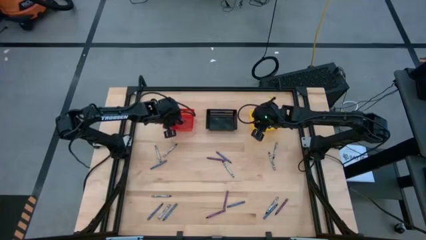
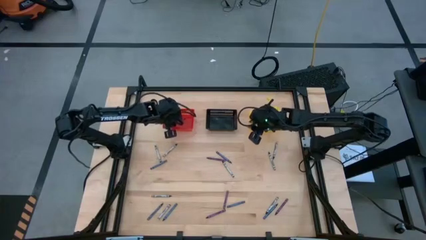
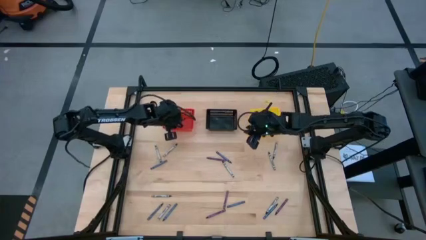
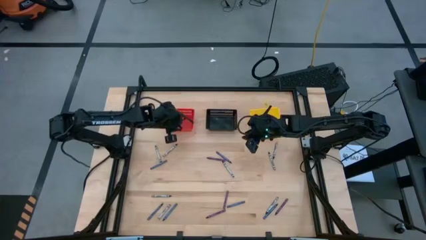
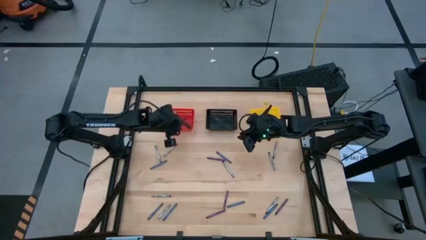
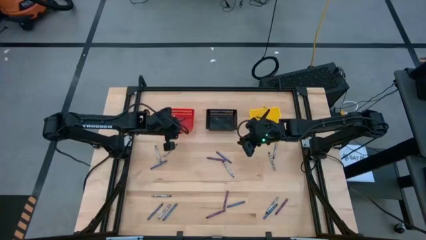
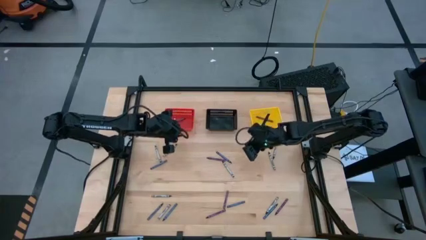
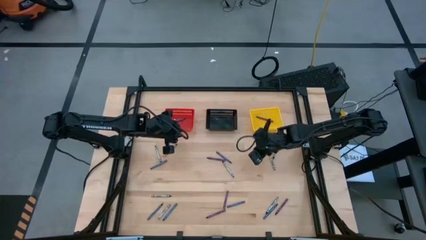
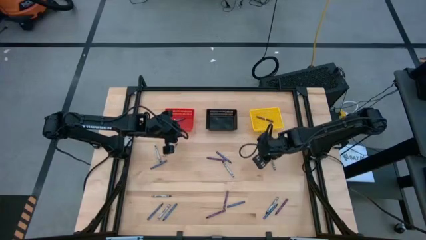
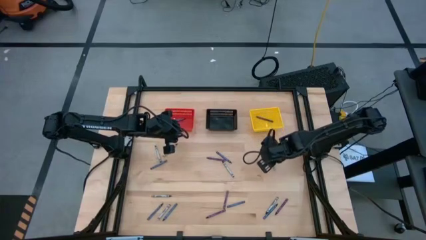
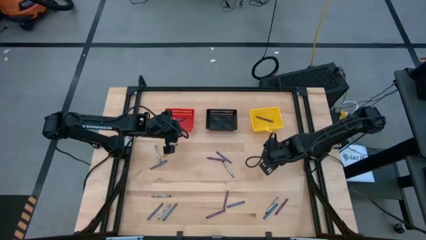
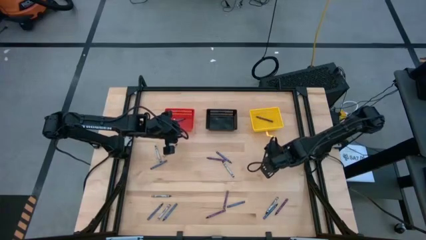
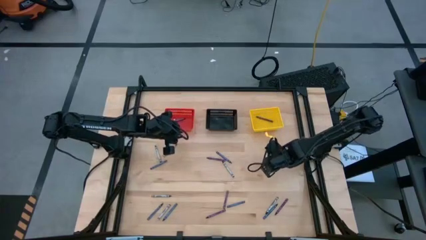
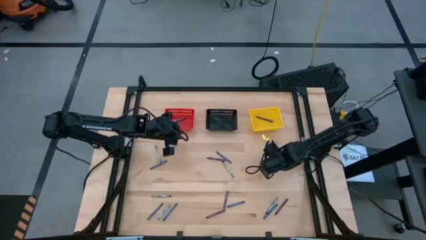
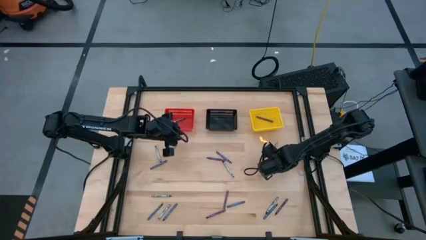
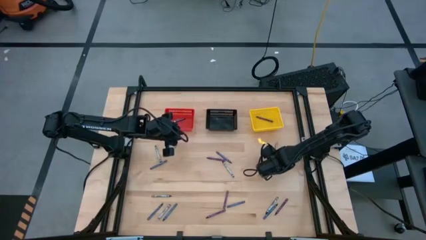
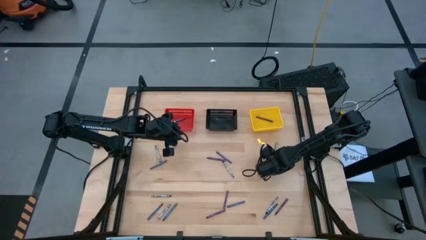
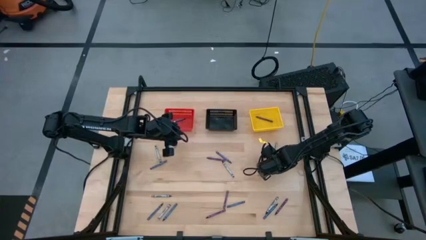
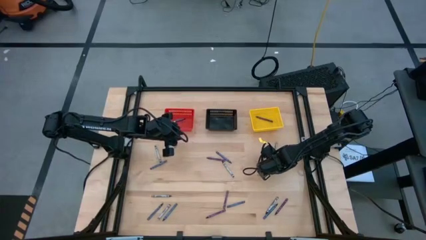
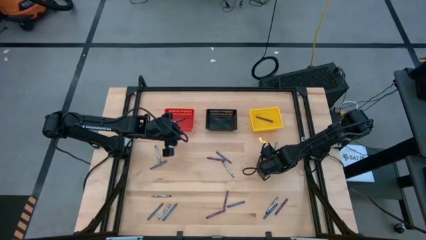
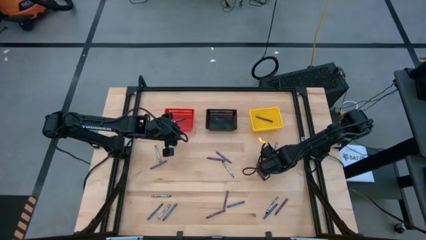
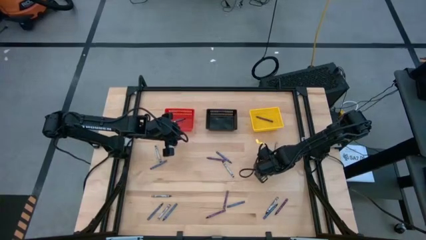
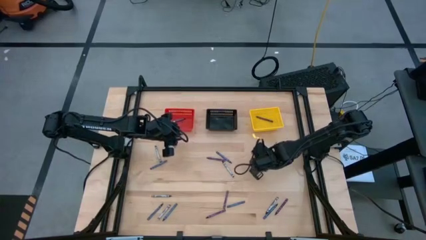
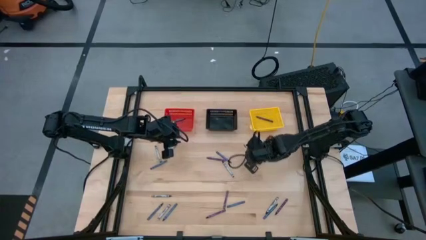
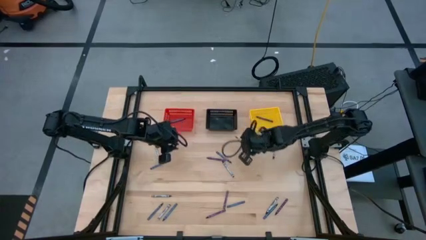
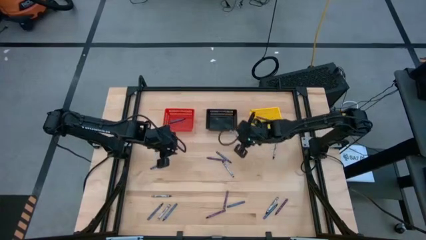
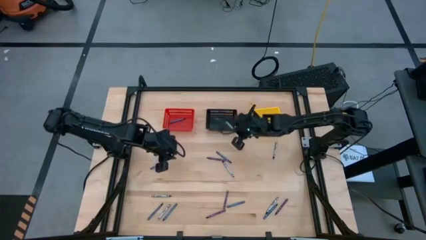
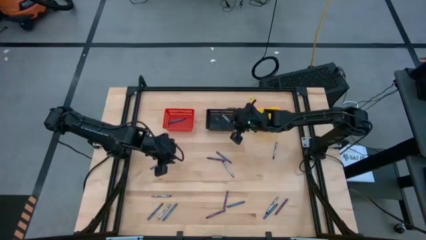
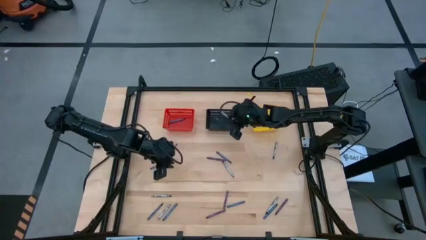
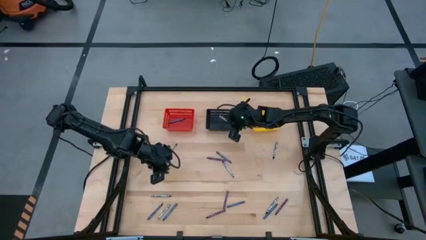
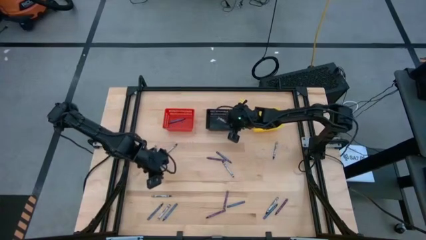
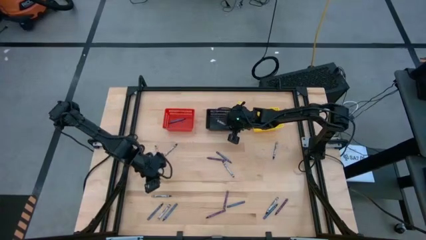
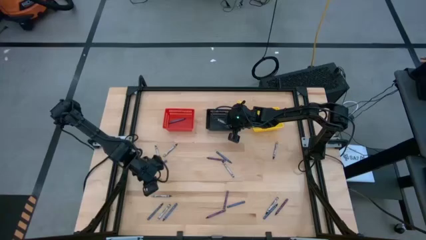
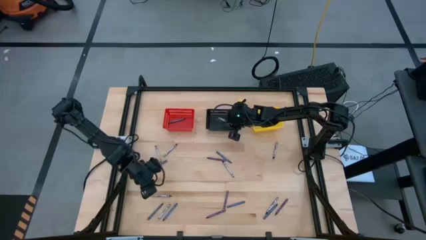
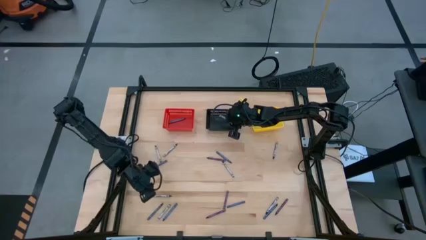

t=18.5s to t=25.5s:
Task: Sort crayons
Put the black crayon into the black basket

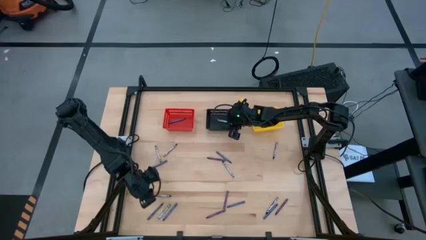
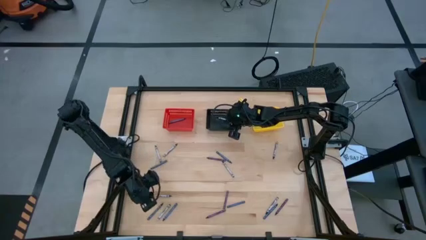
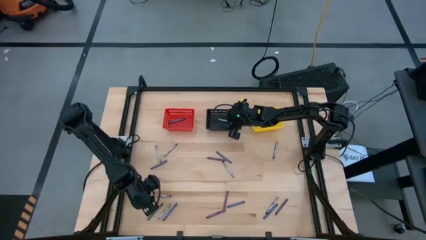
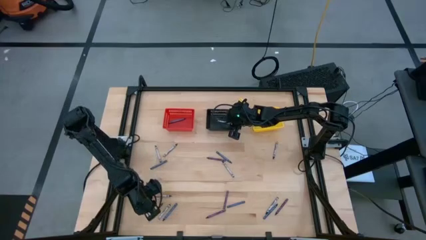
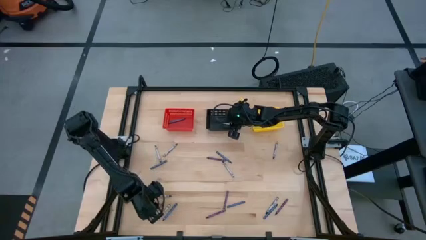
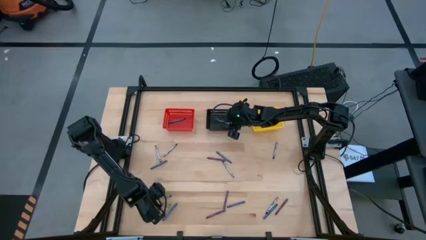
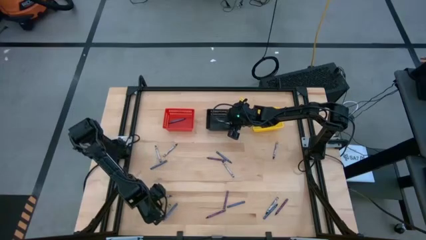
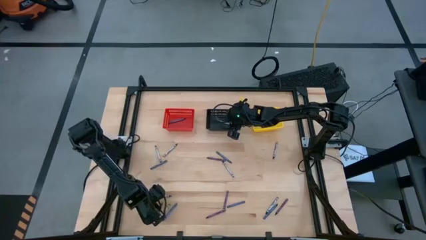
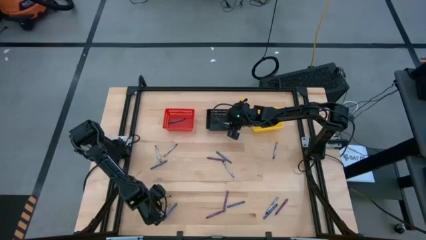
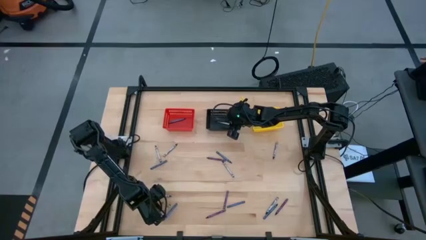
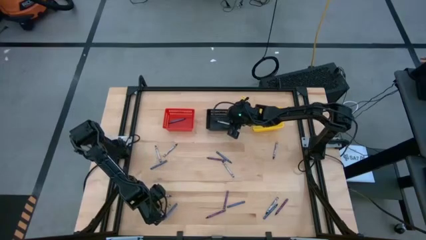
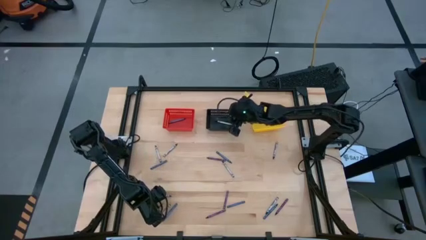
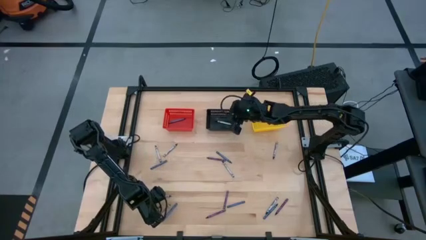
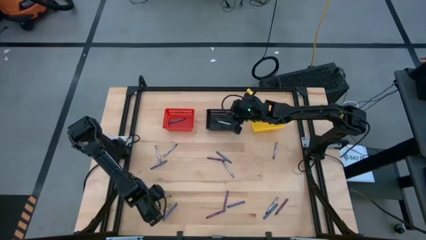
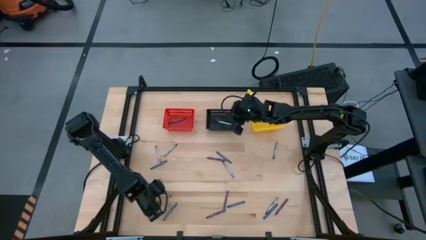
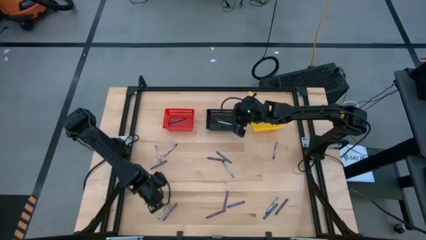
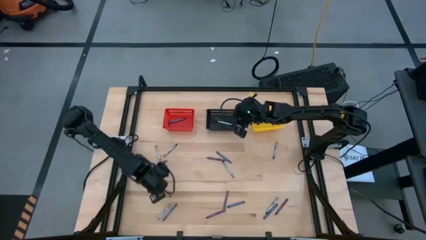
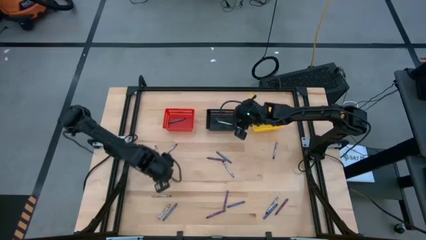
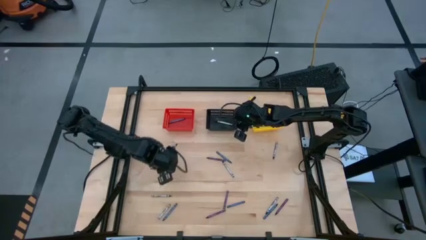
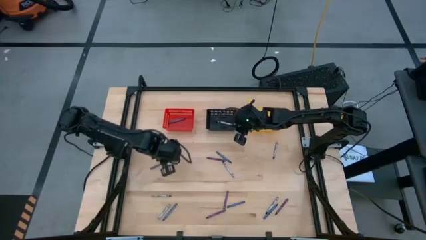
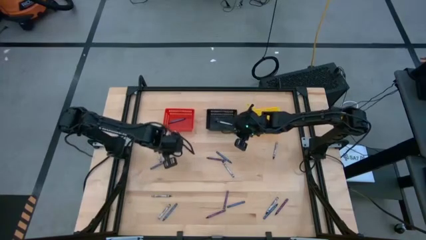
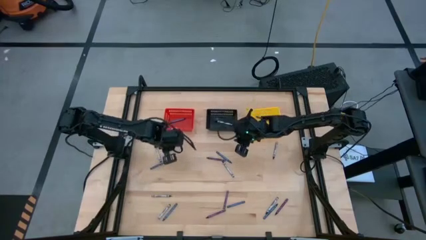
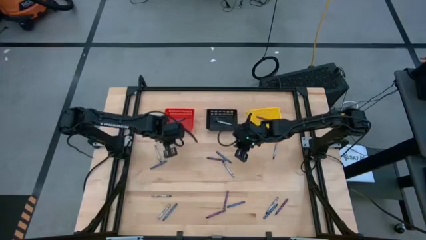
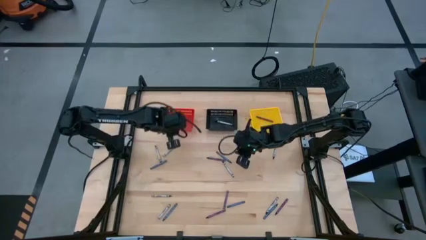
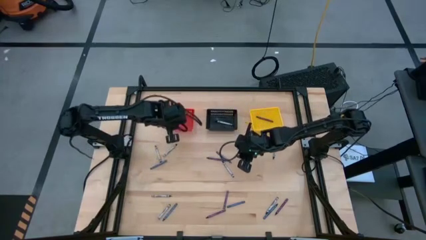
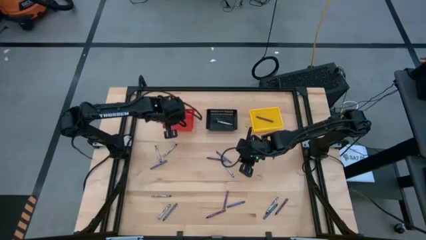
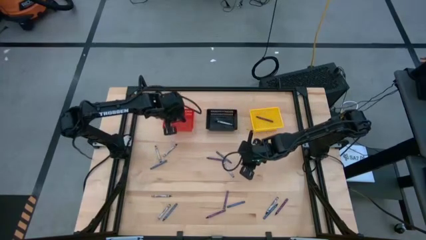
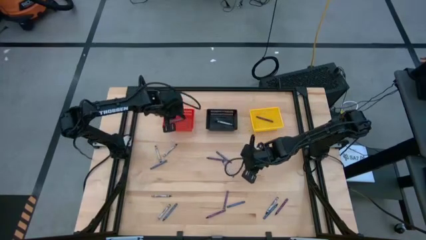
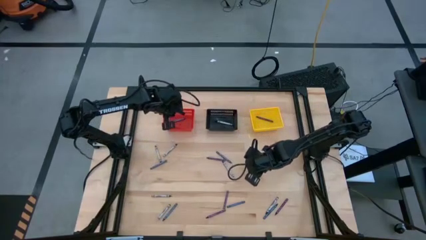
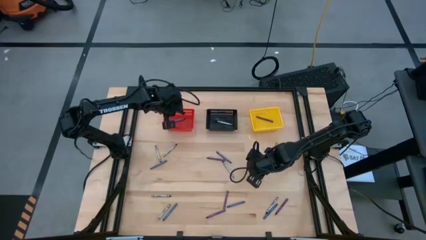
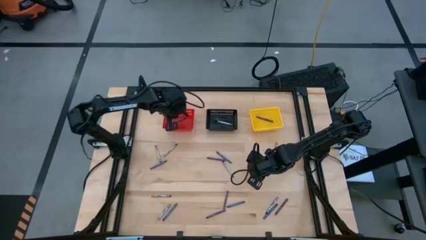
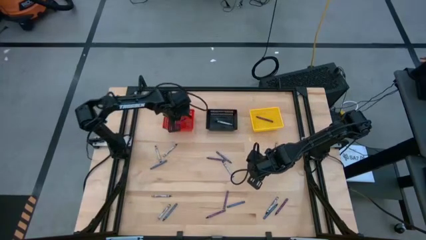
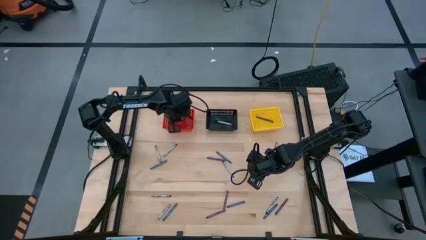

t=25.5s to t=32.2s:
Put the blue crayon into the red basket
